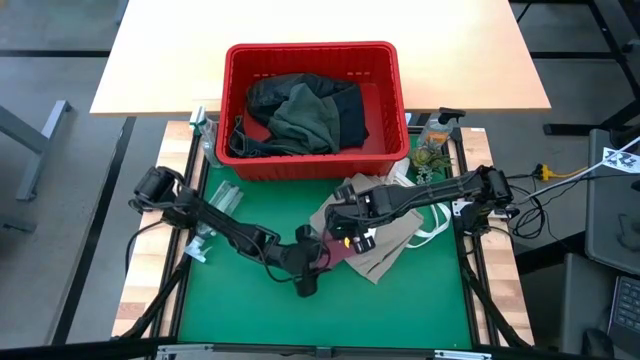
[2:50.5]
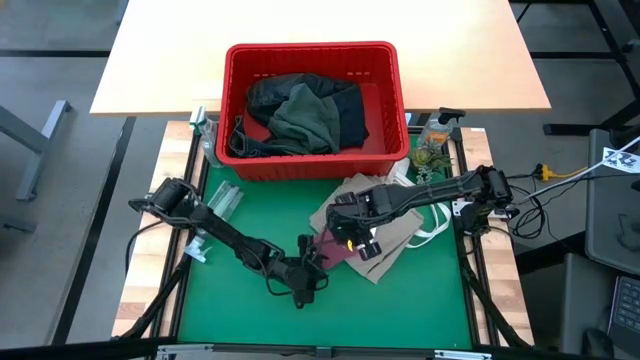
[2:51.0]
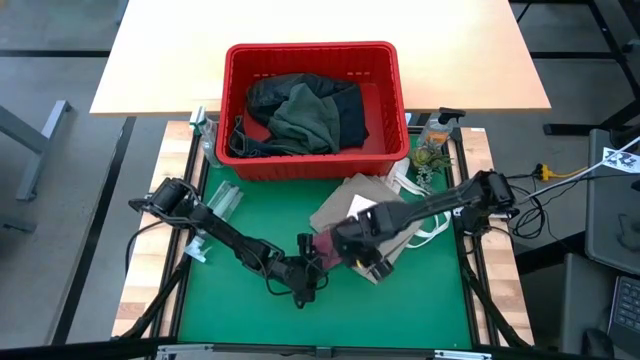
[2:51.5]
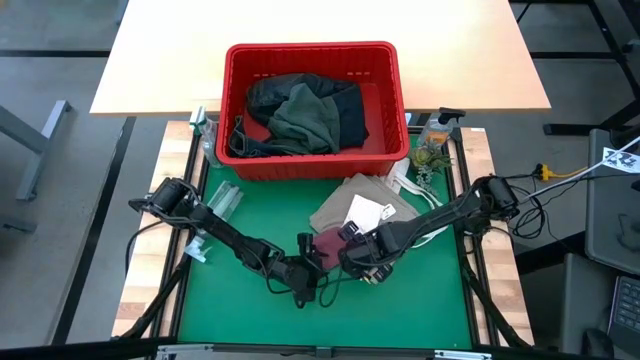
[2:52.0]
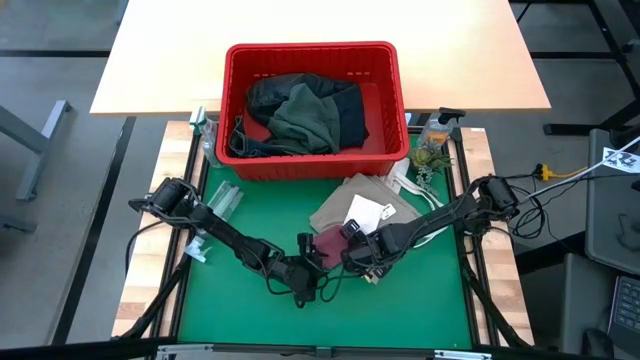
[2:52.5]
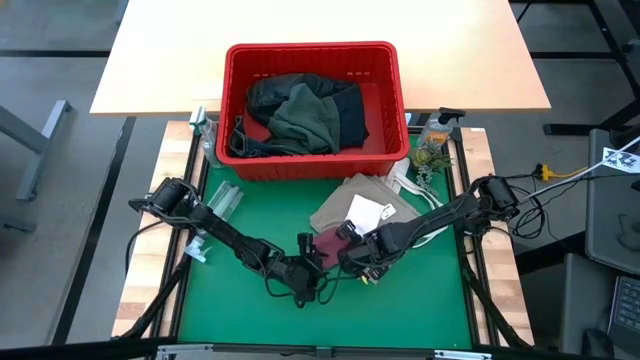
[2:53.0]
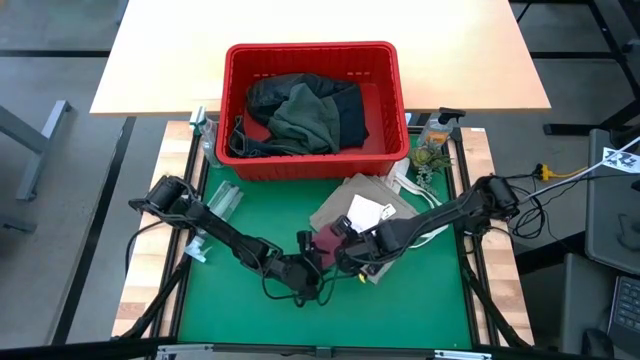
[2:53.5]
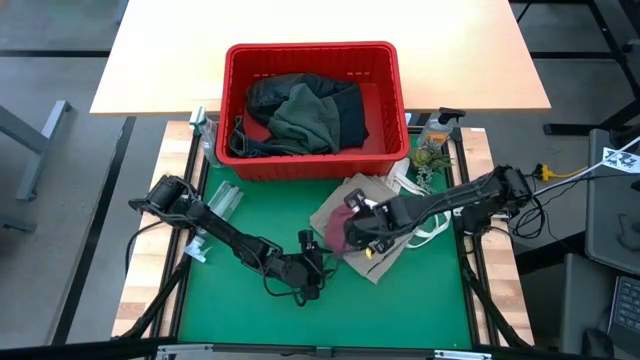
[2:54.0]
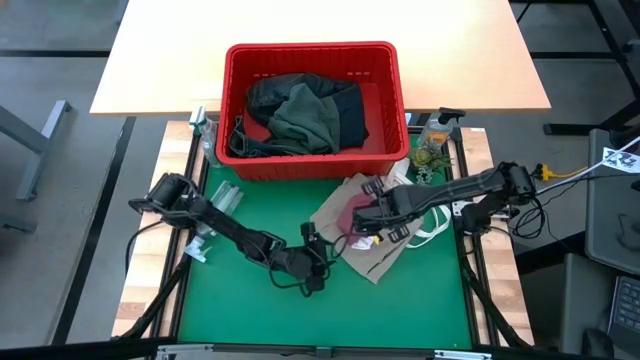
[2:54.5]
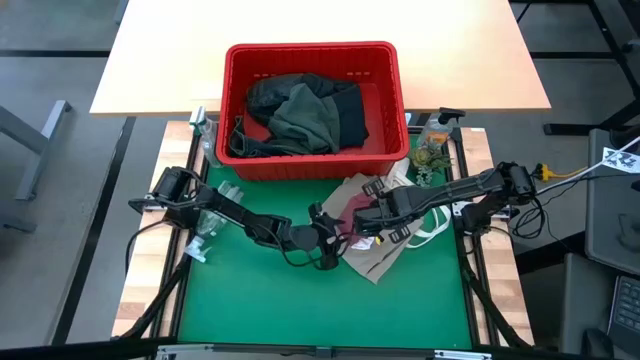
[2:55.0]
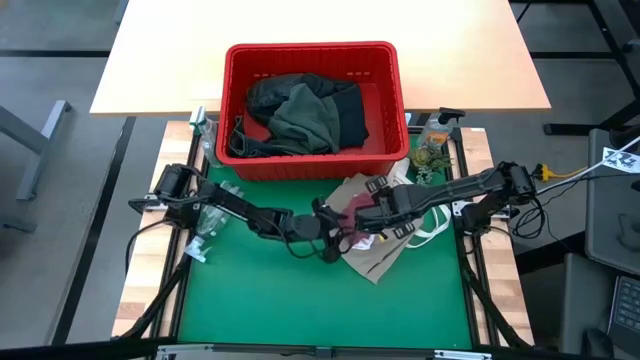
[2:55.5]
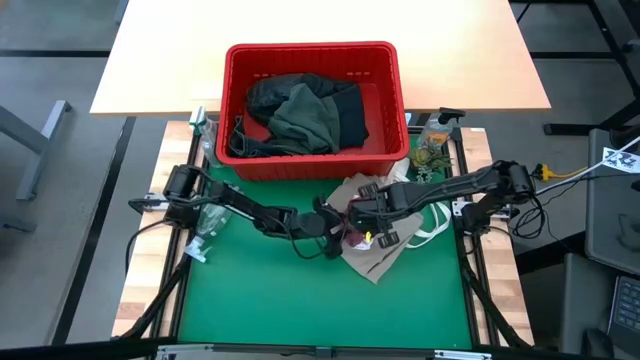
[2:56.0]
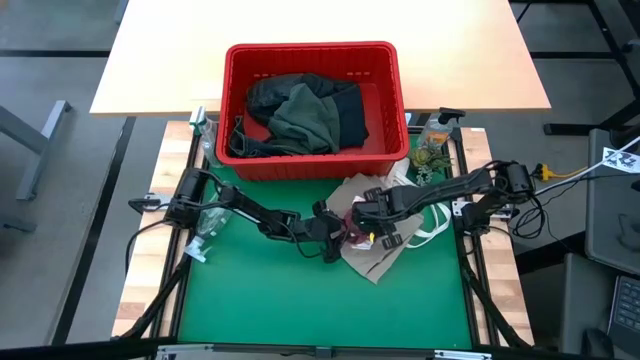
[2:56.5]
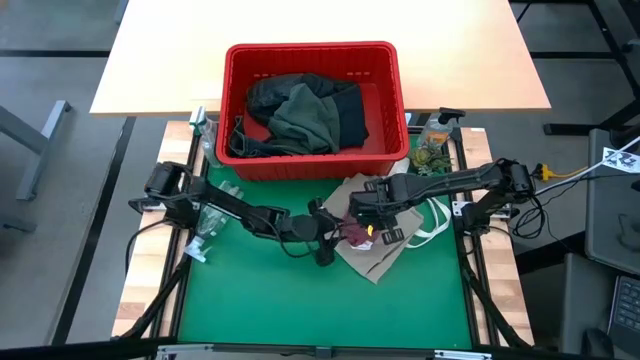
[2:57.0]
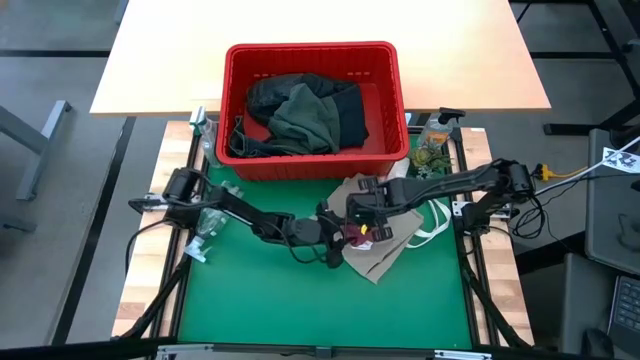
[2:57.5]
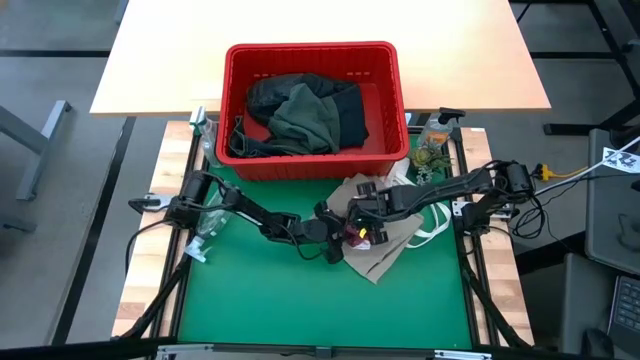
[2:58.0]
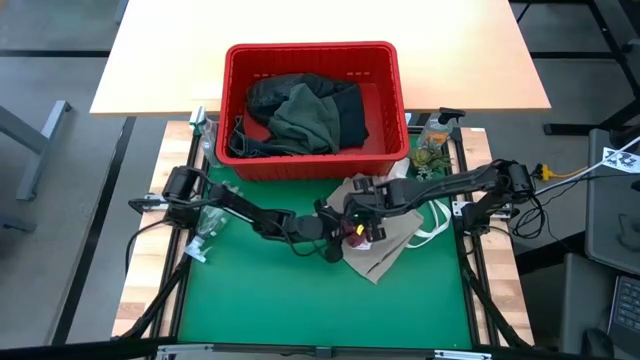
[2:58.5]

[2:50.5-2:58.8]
Task: Fold laundry
Stack the folded pink underwear on top of the folded white underwear

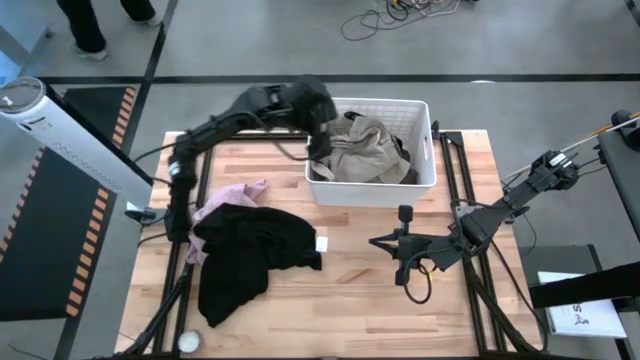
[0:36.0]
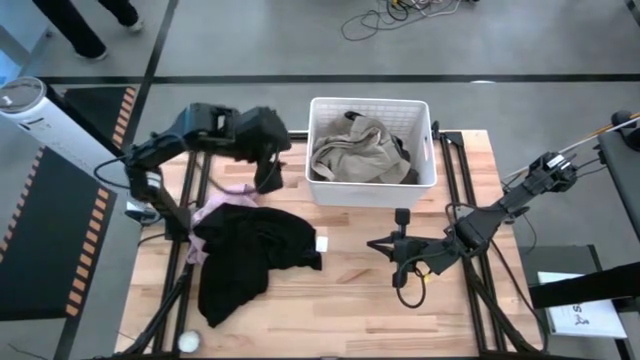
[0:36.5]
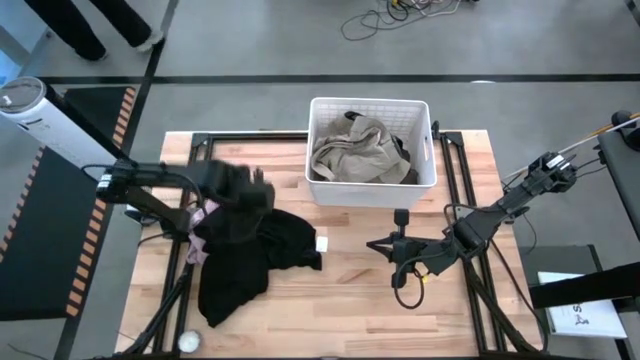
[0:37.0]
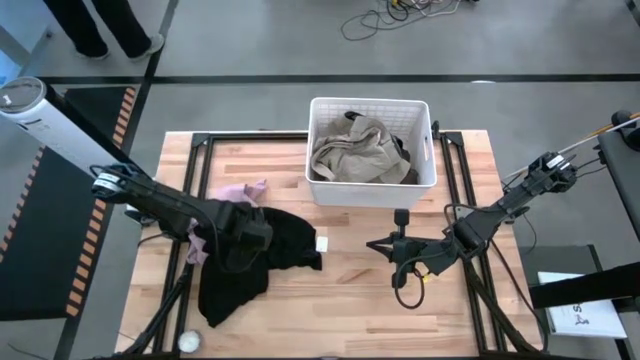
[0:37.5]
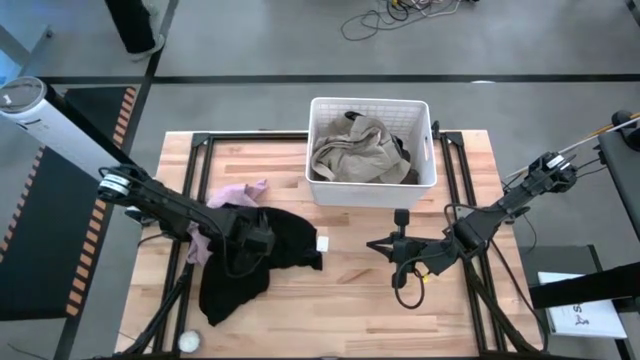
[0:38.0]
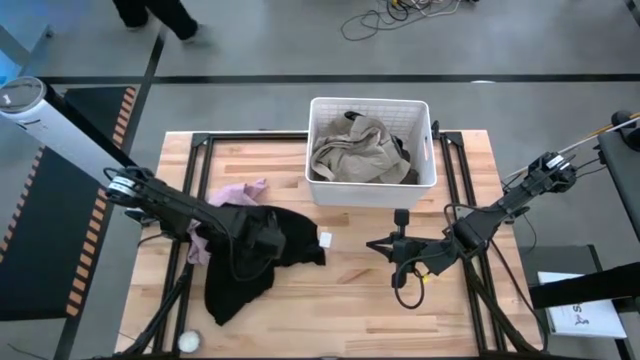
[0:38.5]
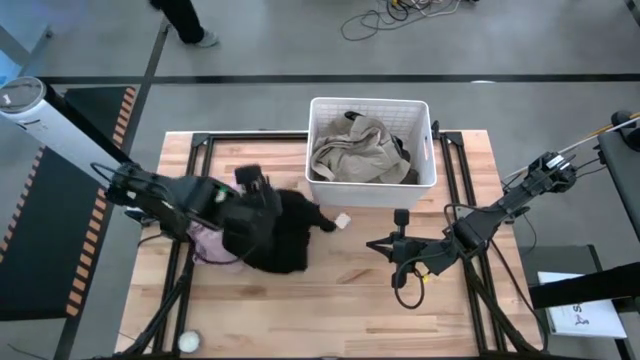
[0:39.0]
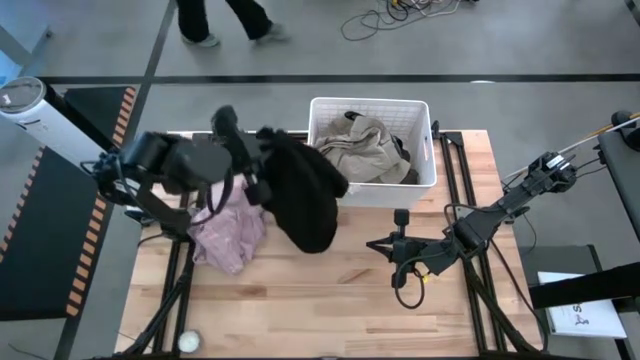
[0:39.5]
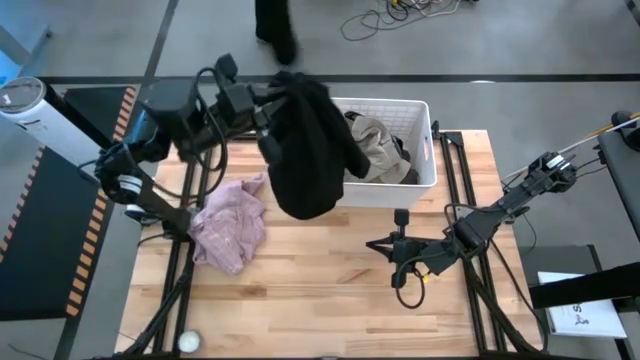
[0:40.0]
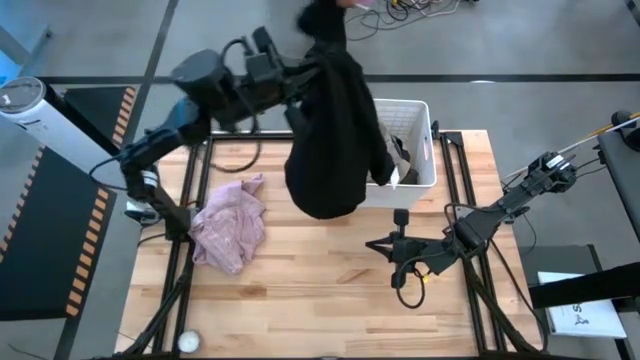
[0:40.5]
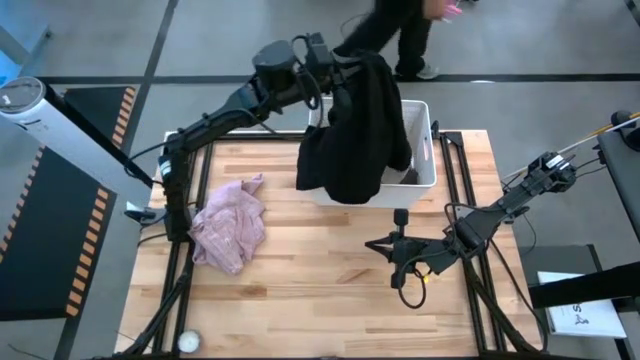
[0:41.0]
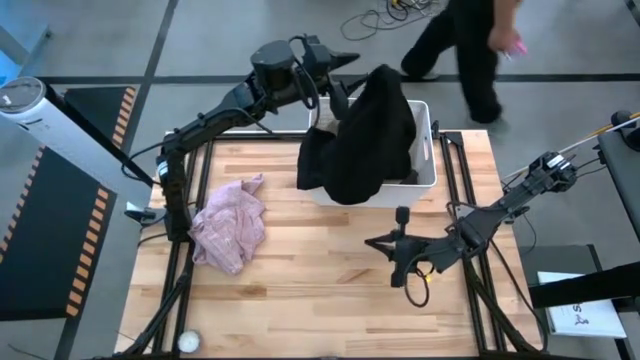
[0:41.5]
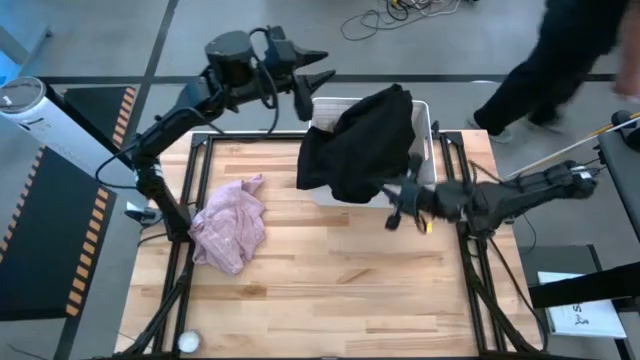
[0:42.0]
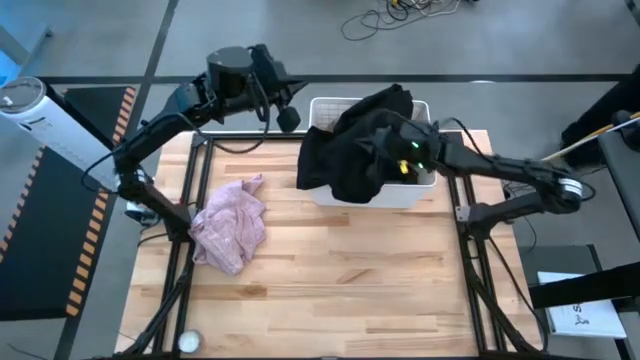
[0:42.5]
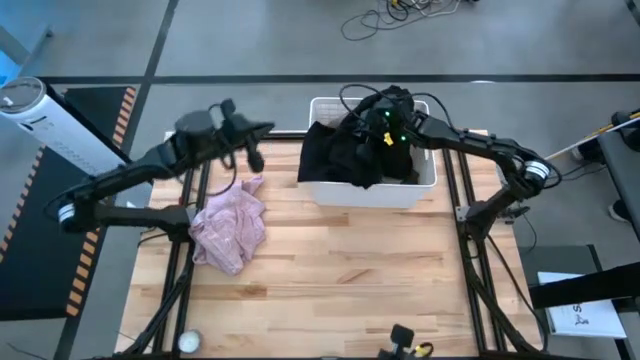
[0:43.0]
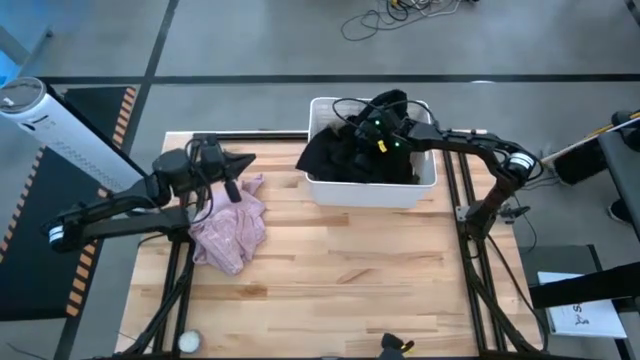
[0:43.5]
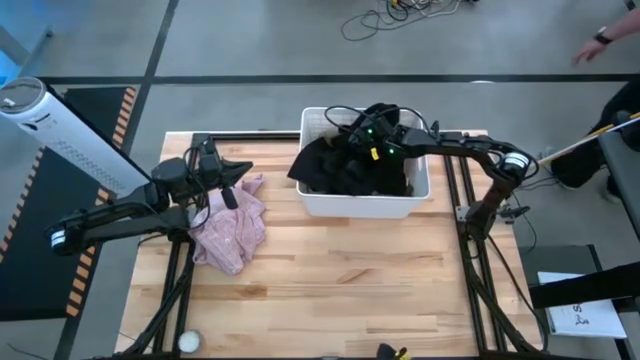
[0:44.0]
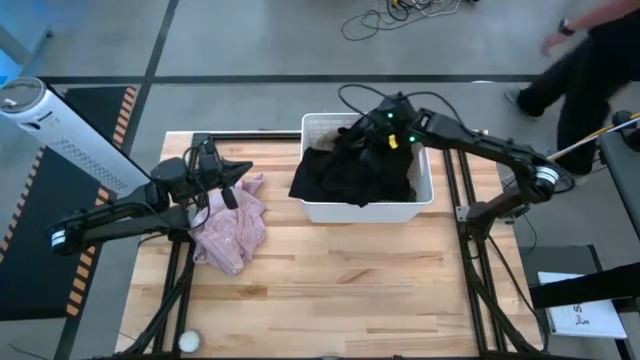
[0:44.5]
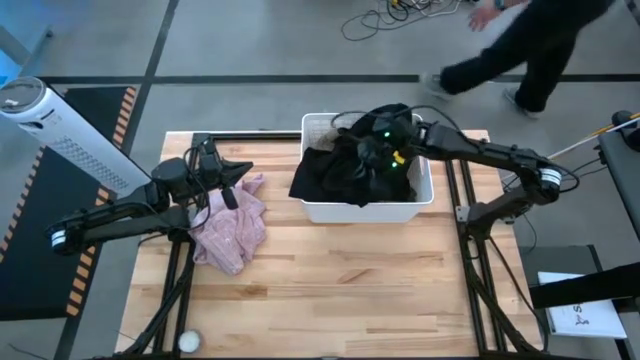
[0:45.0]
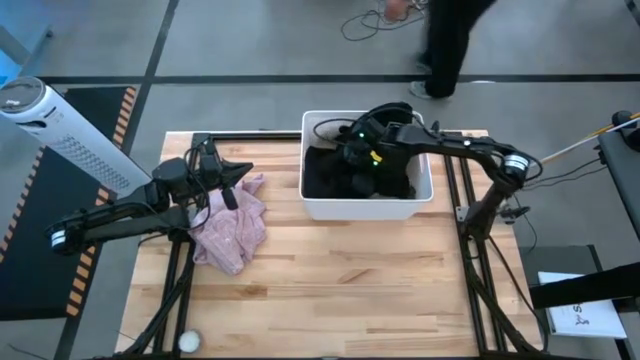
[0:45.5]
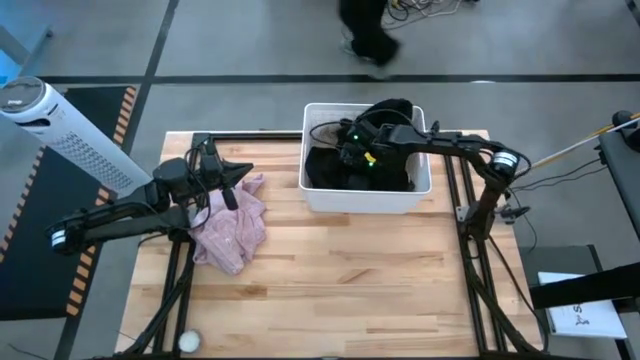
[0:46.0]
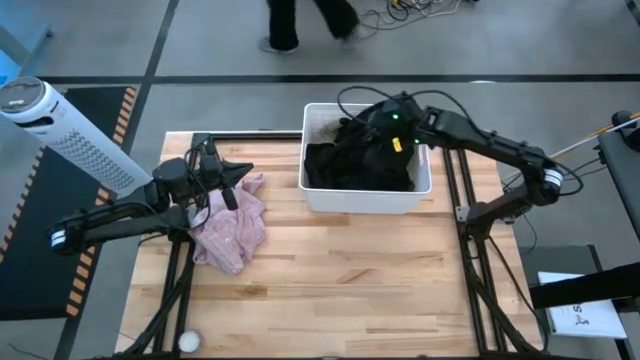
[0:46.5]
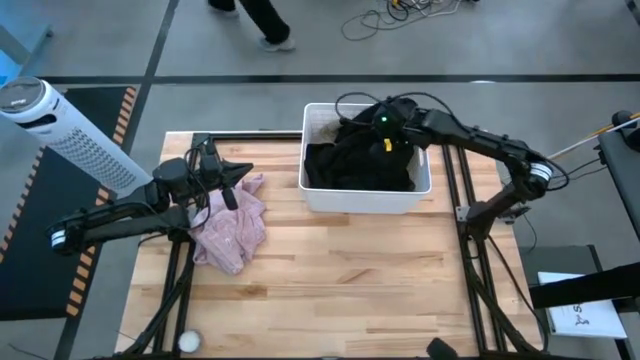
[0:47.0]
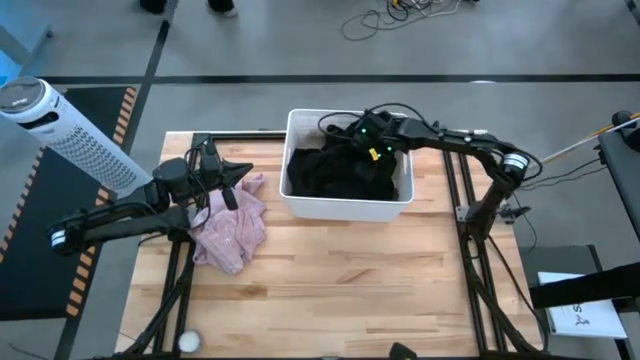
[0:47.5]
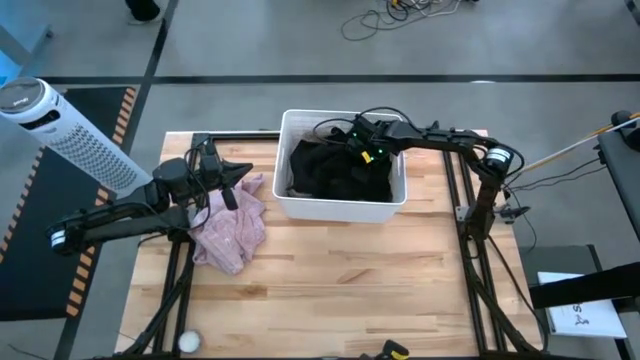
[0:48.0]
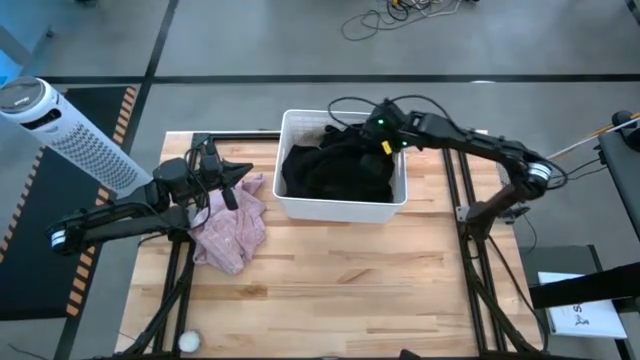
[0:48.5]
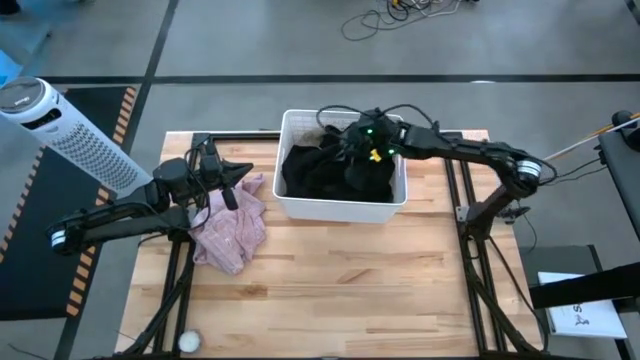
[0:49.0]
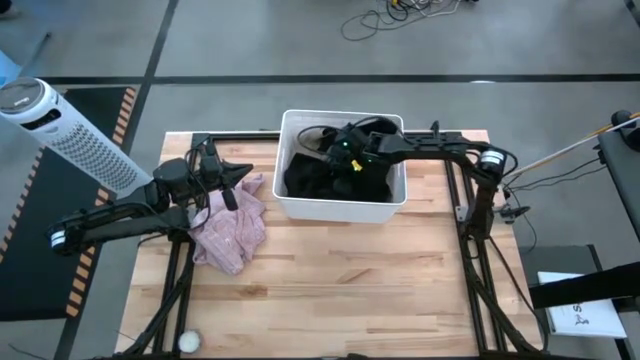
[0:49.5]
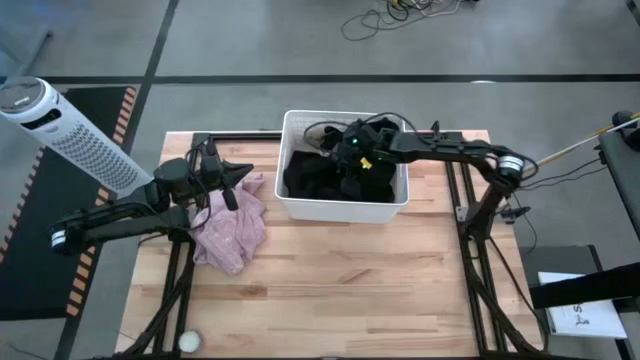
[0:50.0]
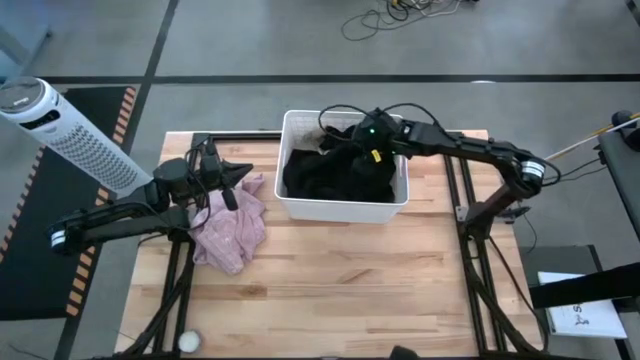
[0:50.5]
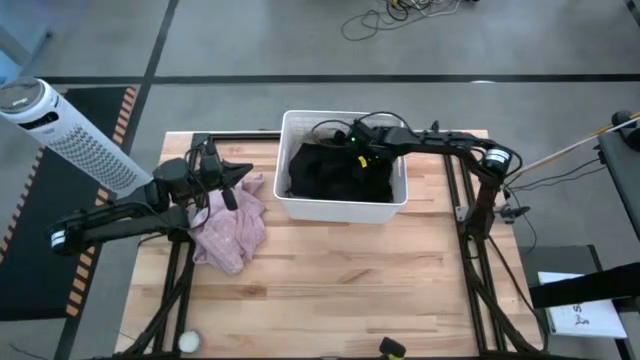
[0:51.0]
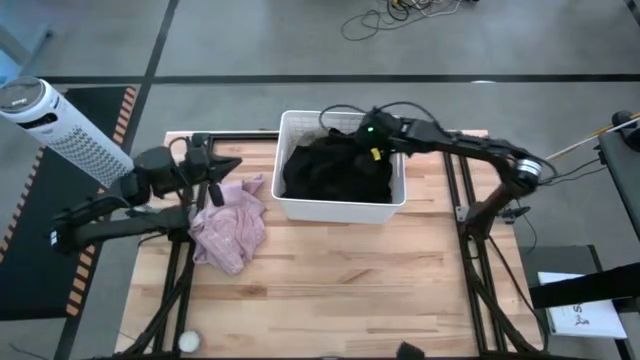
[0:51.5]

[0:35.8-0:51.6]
Task: Sort clothes
Put the black shirt into the white laundry bin
